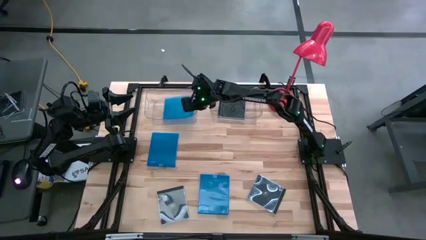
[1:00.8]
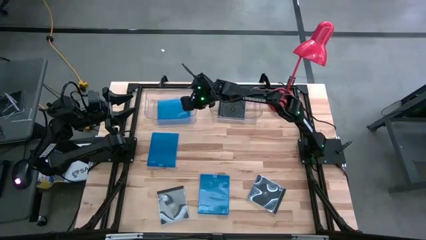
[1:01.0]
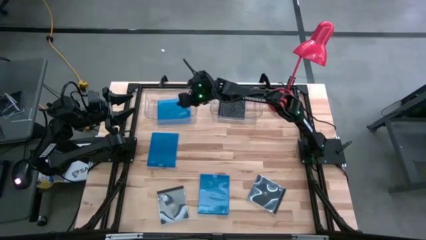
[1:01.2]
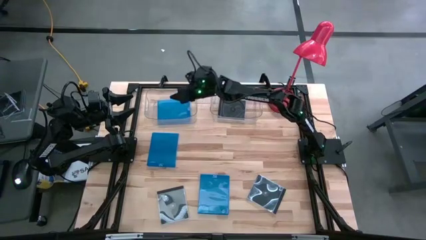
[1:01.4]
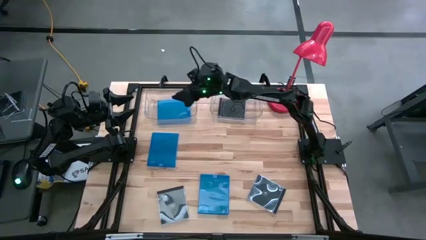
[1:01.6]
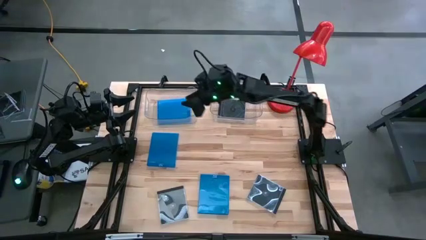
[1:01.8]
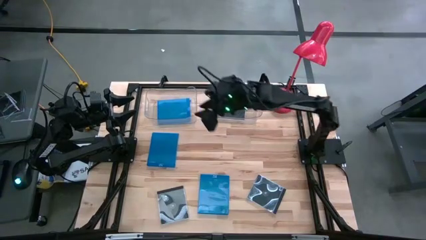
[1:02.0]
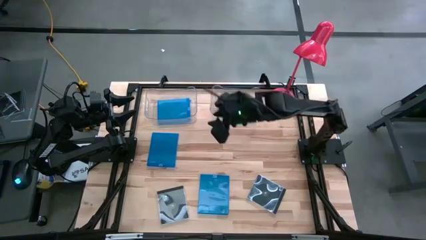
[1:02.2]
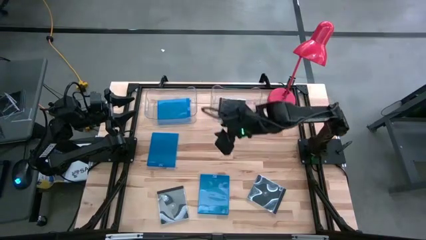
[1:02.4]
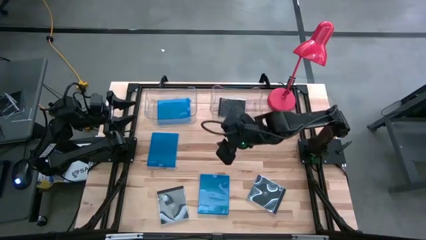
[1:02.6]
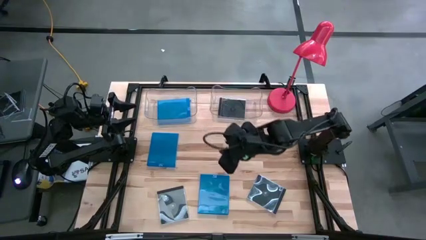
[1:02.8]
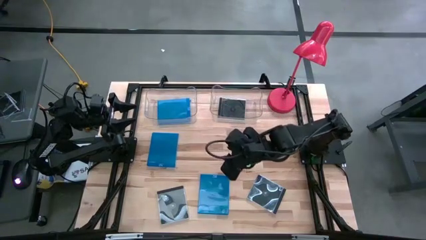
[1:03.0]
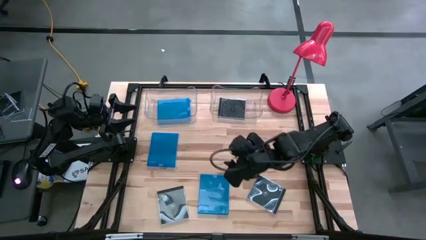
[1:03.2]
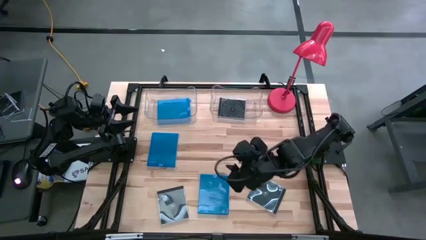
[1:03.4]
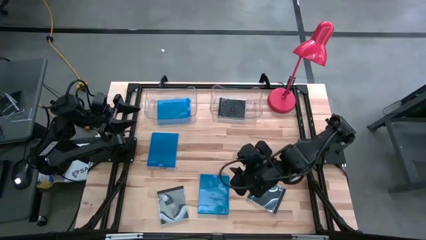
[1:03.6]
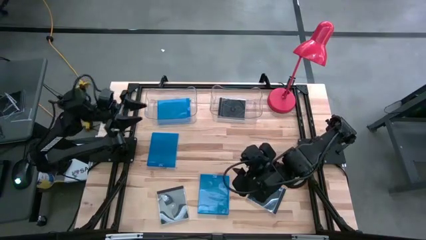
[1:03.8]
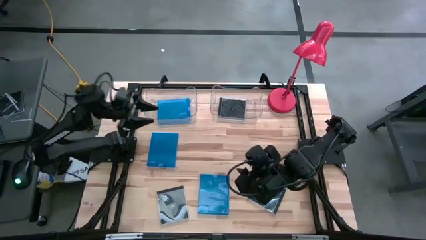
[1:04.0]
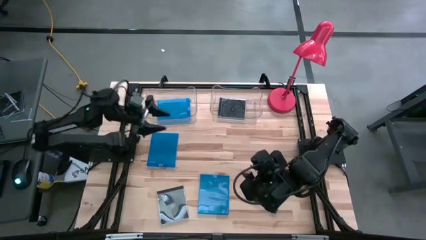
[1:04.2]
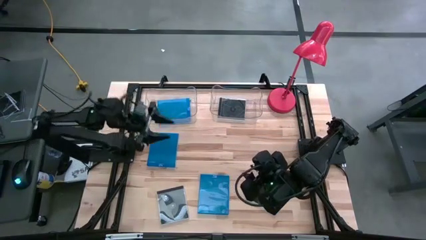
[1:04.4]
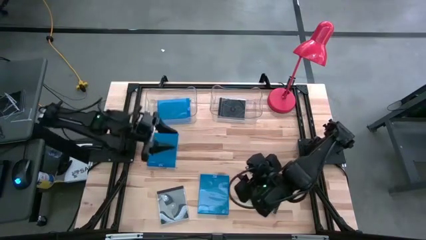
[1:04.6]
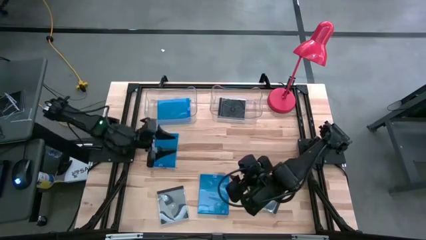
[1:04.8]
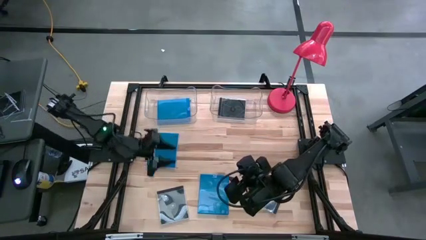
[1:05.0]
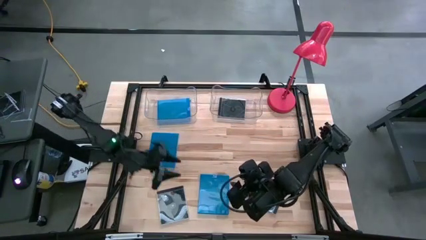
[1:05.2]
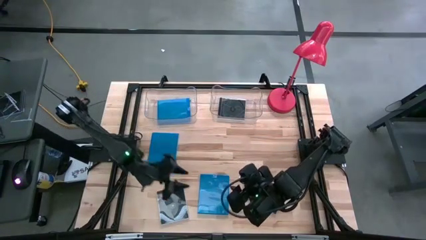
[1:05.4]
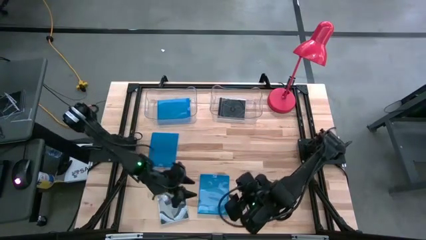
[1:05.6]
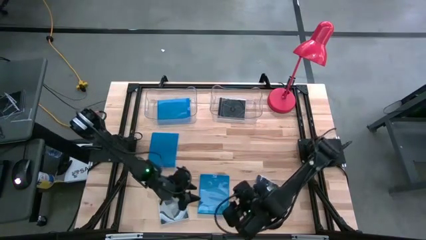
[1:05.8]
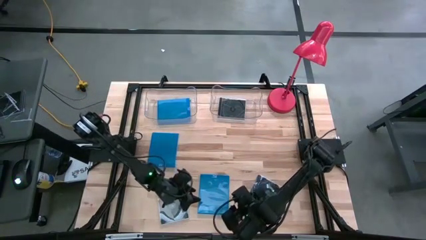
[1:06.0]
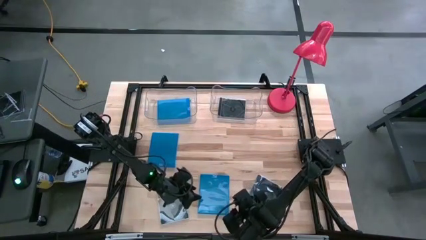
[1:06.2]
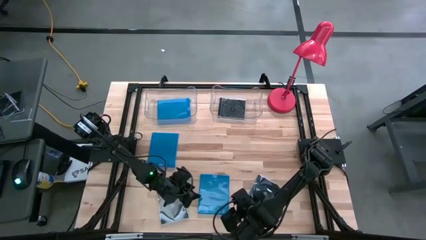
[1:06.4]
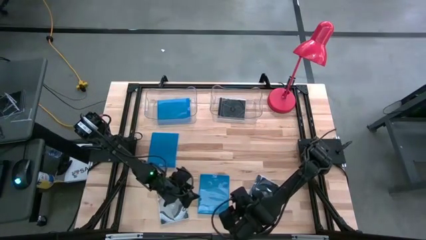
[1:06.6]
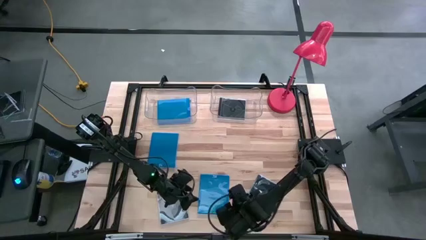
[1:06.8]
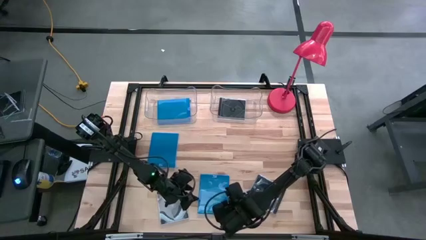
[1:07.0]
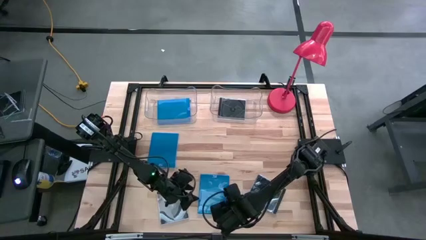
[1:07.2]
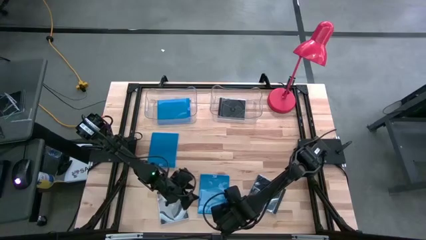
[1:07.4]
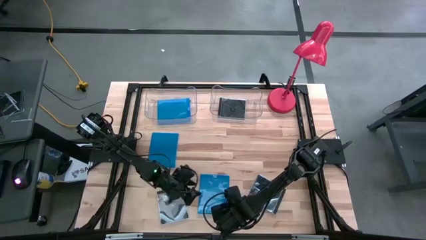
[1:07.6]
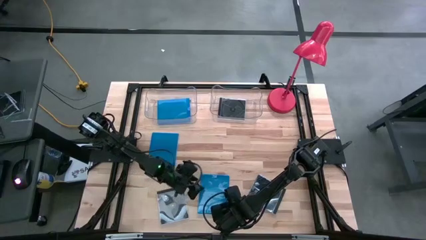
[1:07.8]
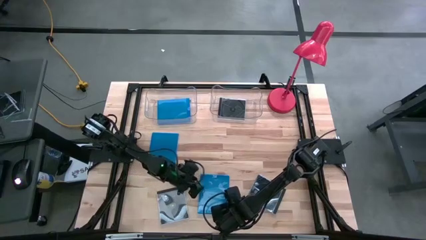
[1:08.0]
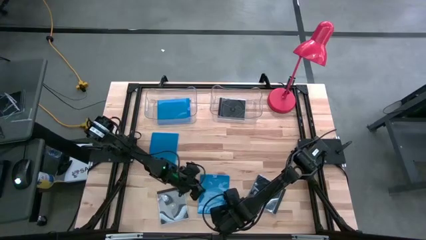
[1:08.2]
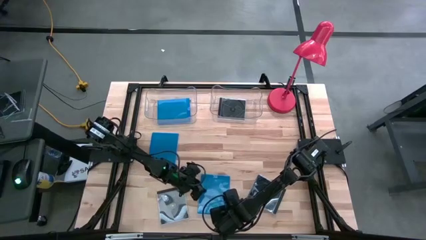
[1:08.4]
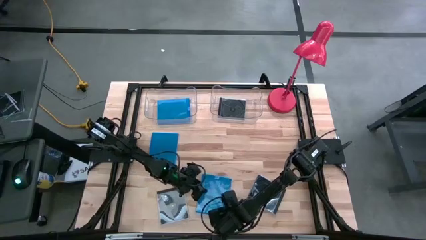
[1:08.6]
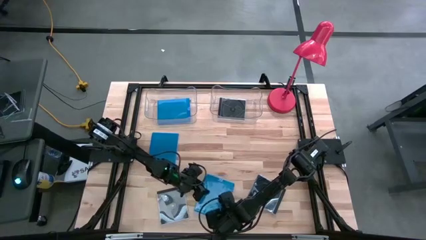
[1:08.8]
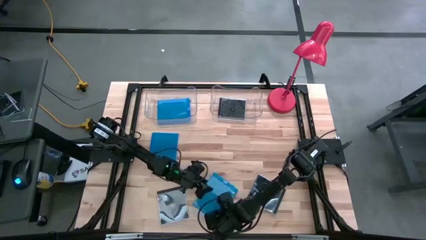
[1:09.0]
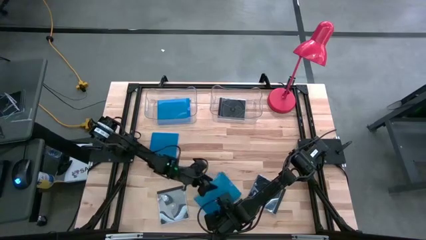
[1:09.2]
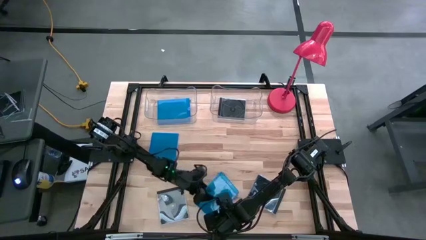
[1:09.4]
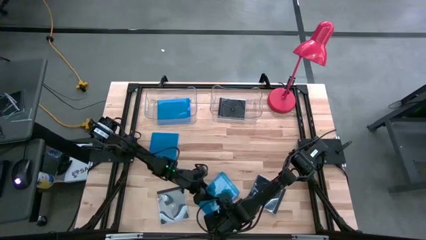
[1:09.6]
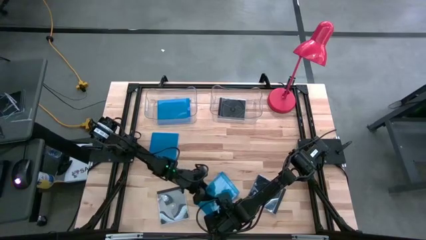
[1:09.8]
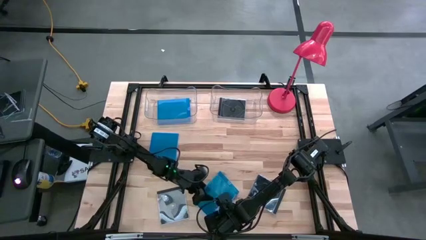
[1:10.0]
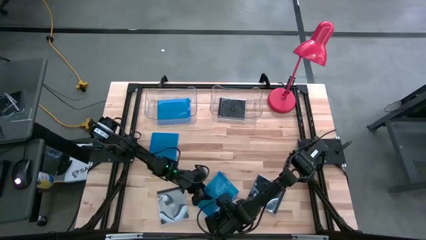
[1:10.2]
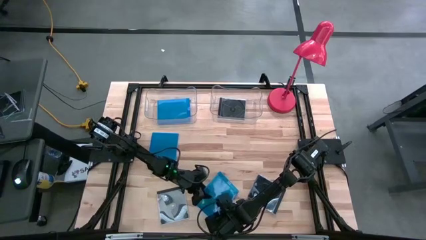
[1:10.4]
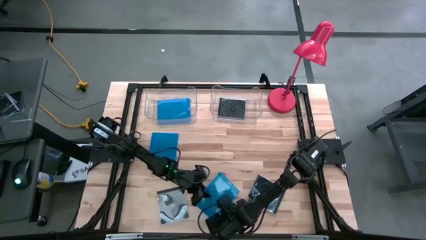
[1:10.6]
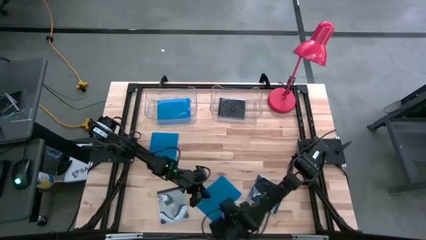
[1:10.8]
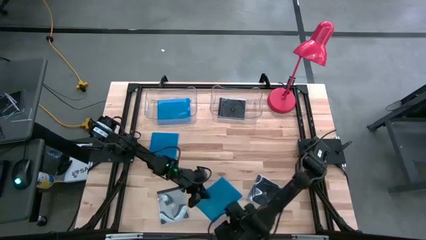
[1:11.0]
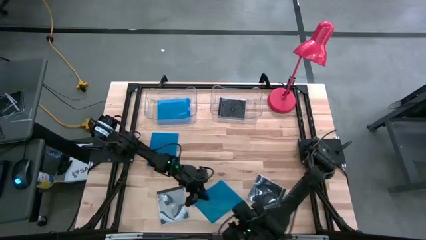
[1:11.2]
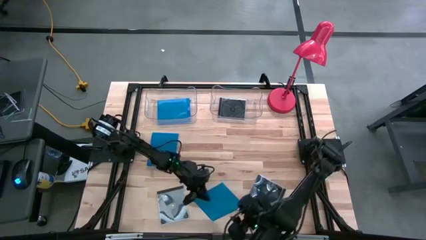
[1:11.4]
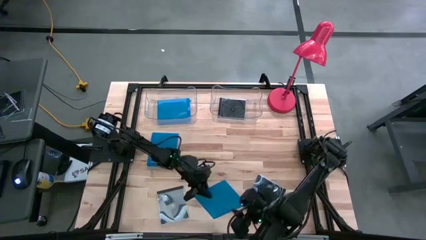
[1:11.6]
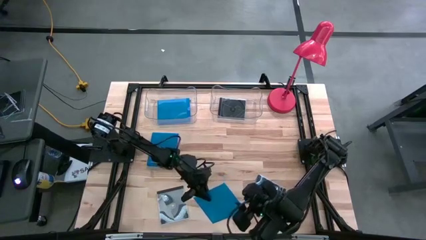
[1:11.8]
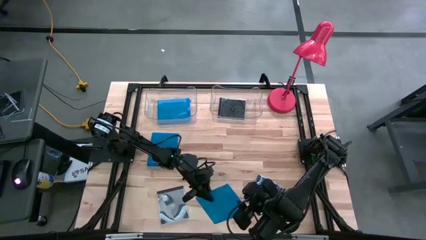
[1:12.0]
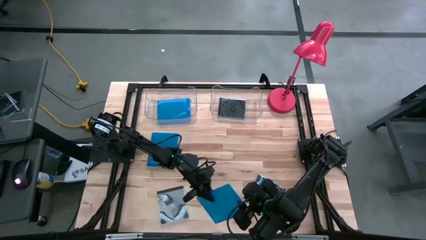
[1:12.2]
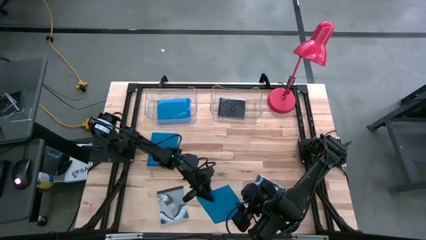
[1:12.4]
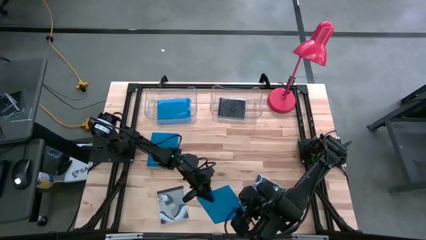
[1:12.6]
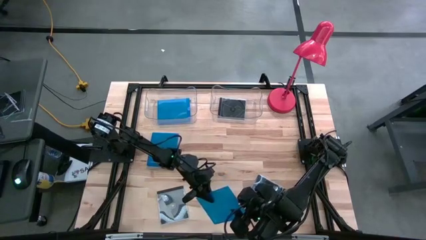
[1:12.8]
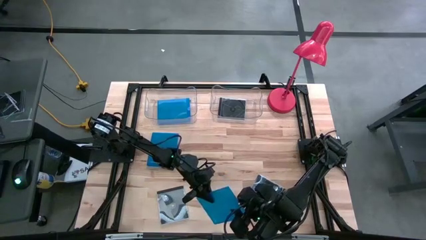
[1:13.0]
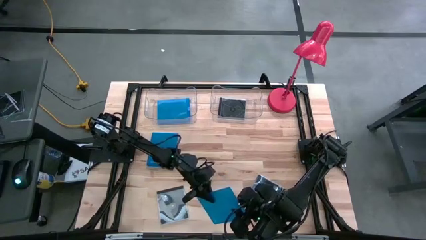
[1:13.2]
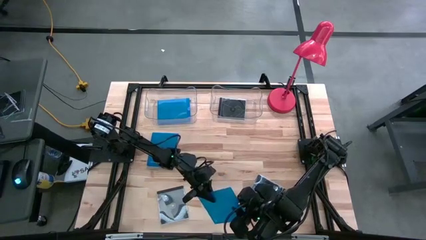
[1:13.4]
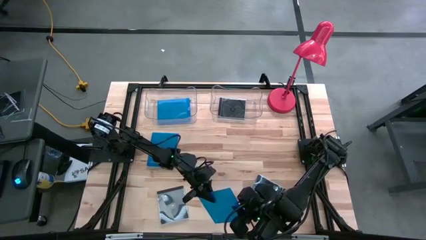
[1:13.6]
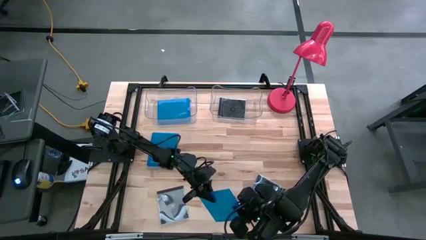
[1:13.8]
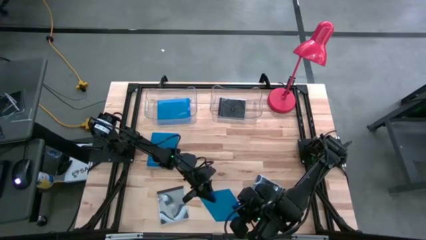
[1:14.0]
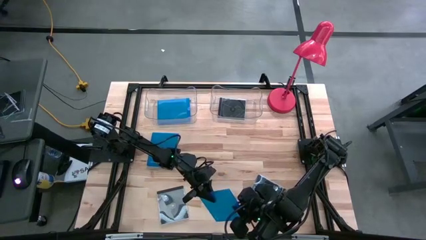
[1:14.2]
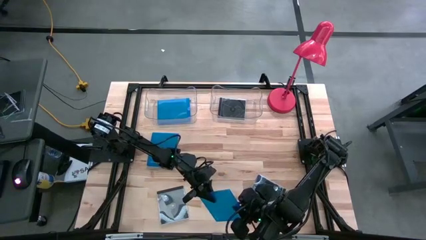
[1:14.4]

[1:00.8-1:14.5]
Task: Pick & place jewel cases by type
Put the bottom blue CD case into the left transparent bin

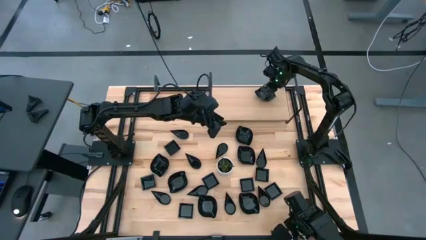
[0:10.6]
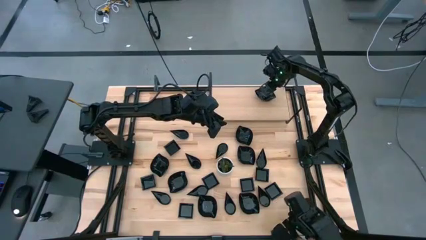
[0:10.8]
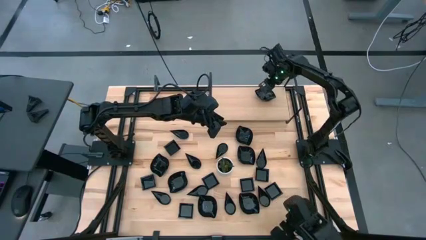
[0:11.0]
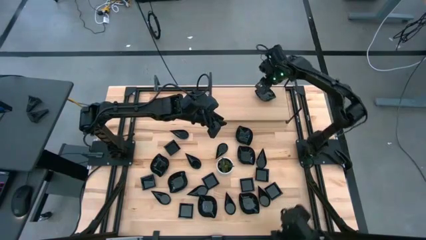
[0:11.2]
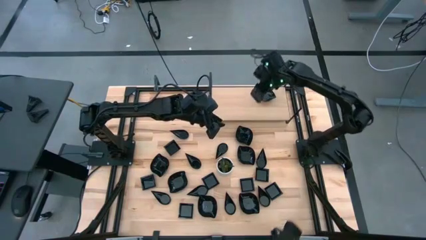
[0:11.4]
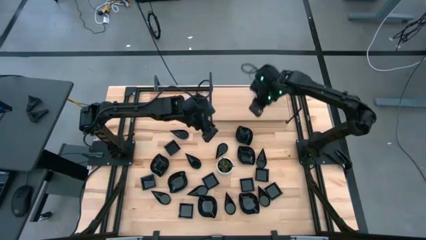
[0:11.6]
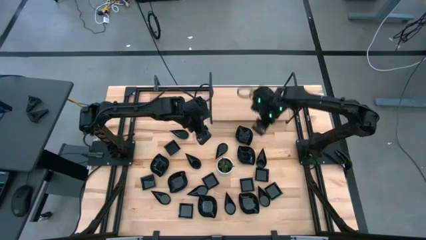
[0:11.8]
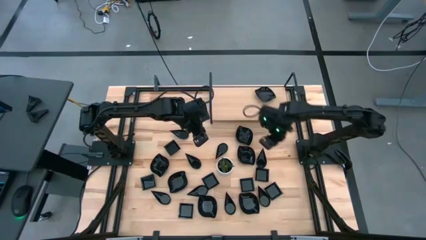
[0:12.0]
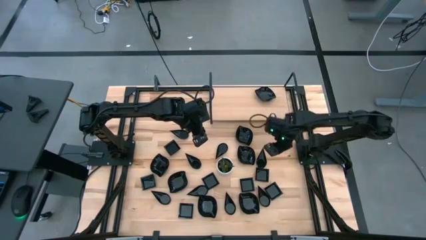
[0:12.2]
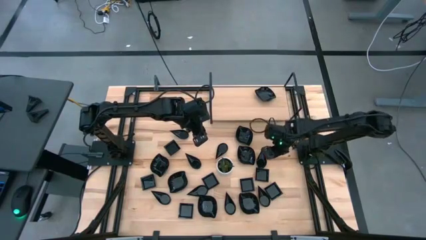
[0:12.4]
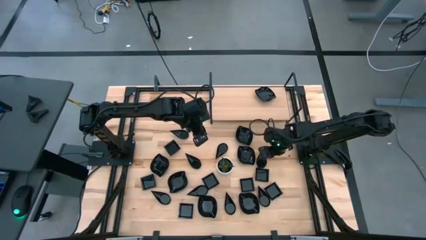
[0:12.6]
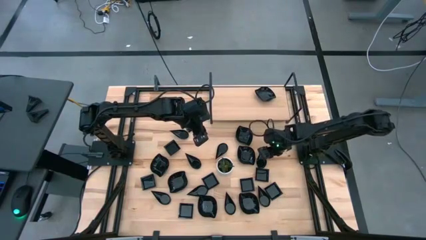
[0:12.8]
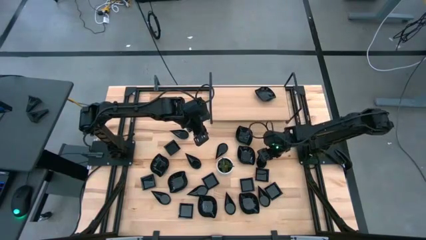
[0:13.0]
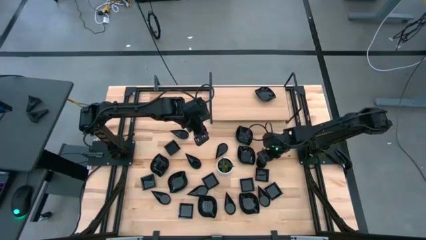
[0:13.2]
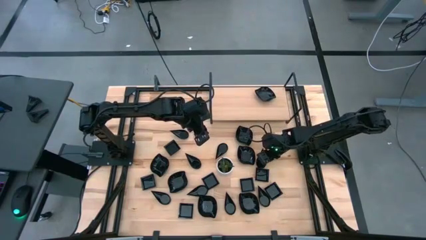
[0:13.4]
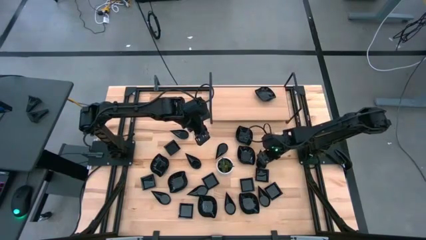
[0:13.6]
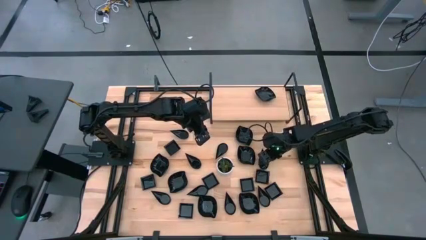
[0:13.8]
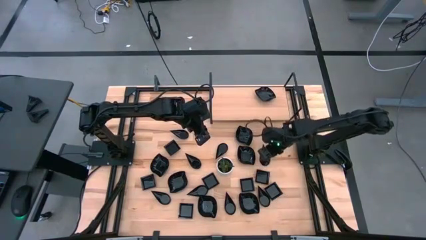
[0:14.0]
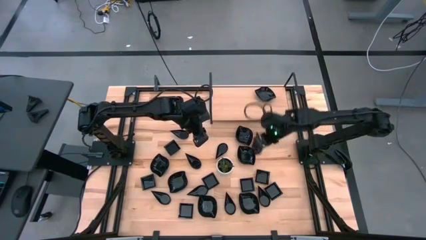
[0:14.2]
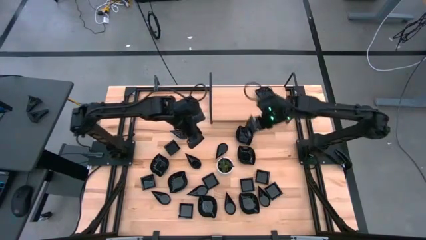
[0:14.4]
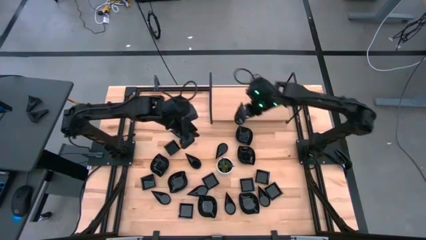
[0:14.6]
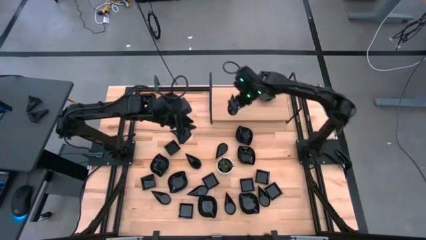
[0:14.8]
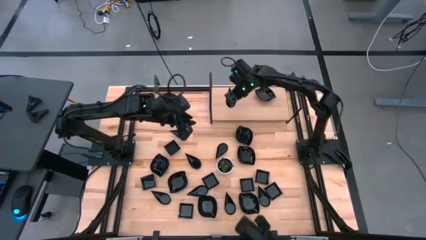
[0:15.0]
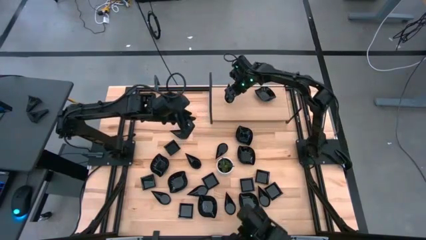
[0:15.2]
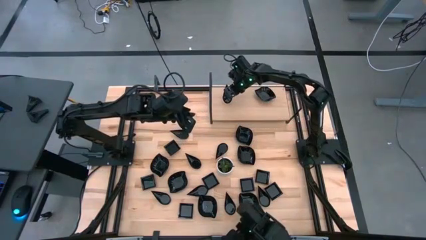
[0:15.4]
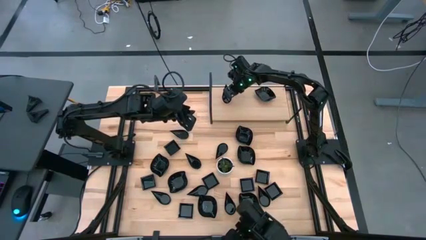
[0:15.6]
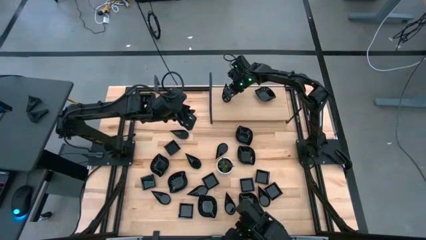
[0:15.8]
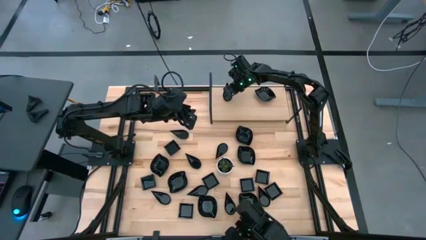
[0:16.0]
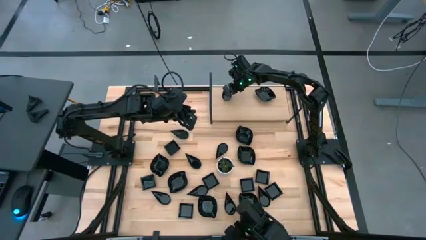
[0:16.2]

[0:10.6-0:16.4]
Task: Pick & Place Mini shaped plates
Put the drop shaped plate on the shelf
